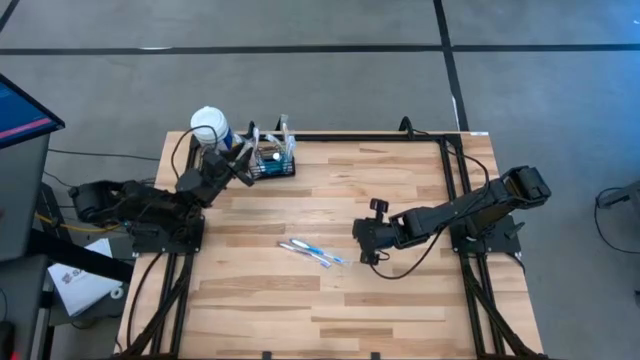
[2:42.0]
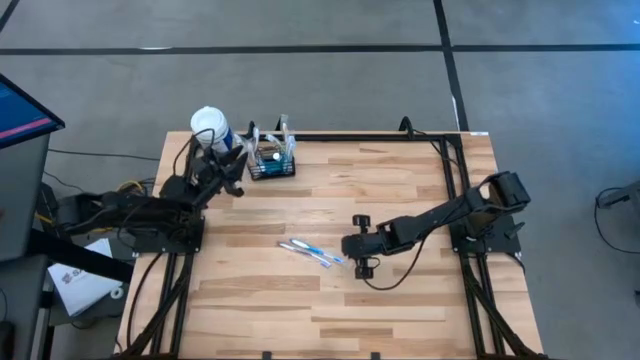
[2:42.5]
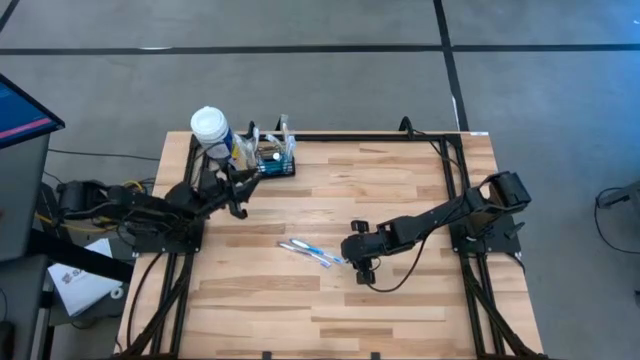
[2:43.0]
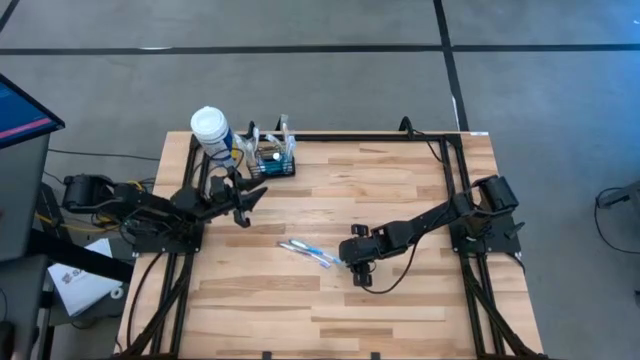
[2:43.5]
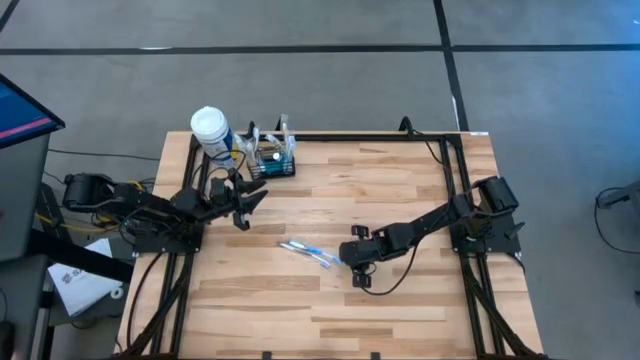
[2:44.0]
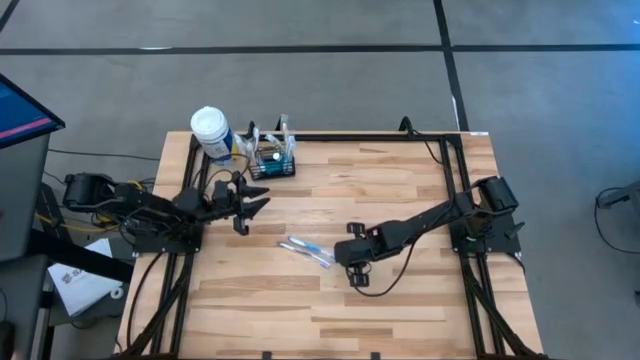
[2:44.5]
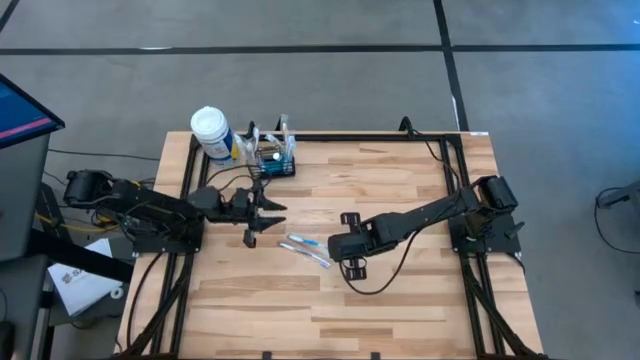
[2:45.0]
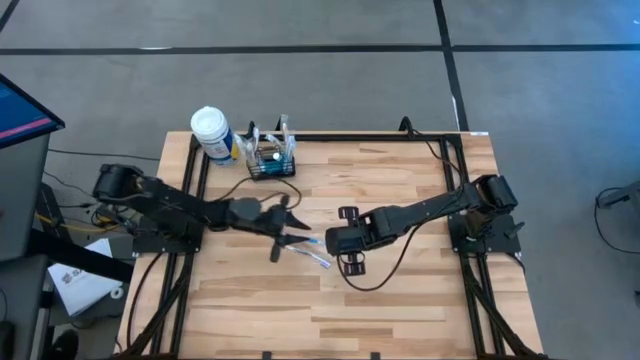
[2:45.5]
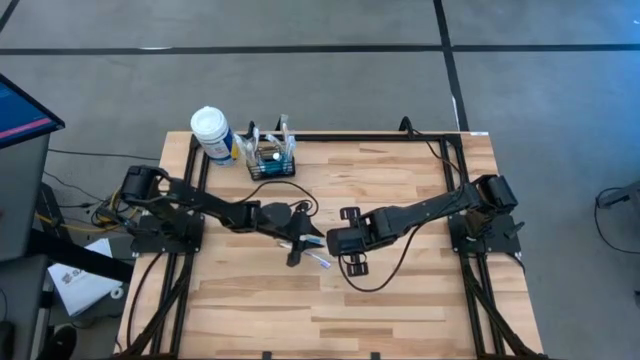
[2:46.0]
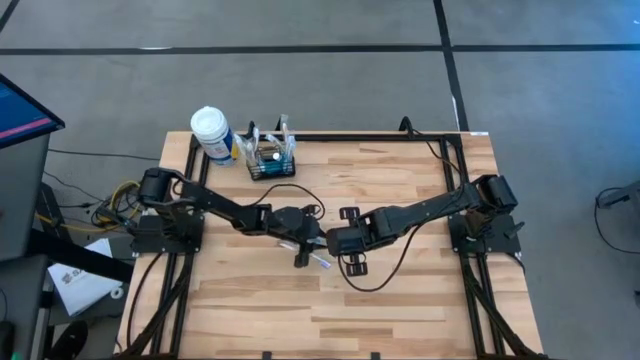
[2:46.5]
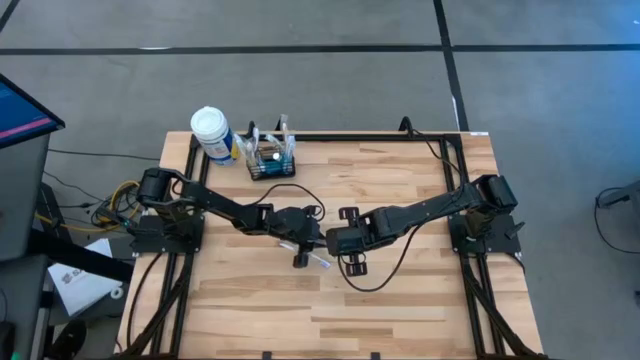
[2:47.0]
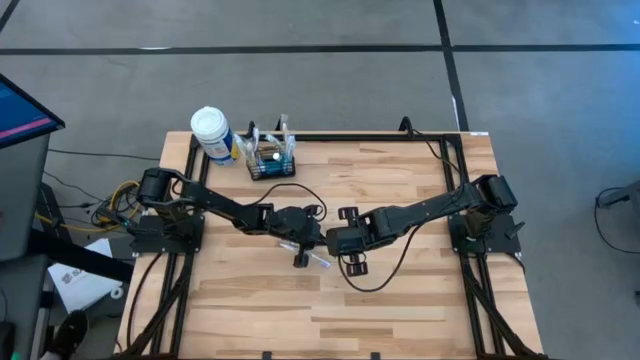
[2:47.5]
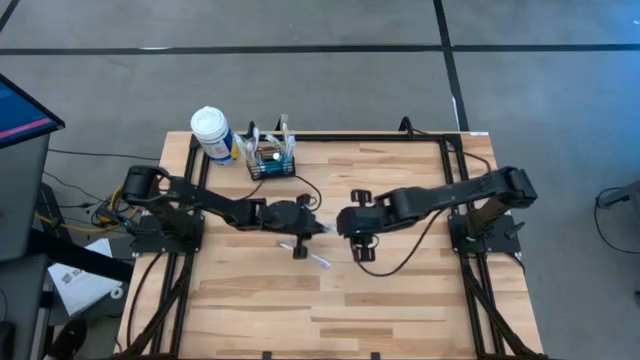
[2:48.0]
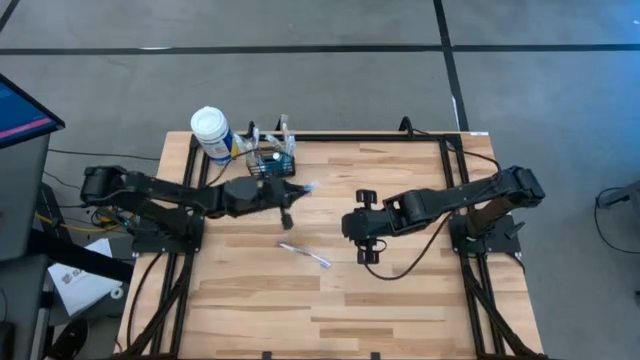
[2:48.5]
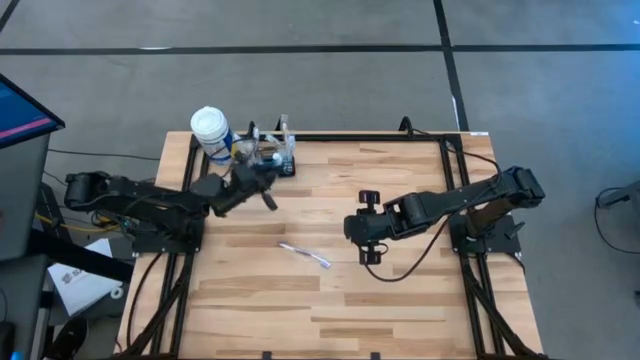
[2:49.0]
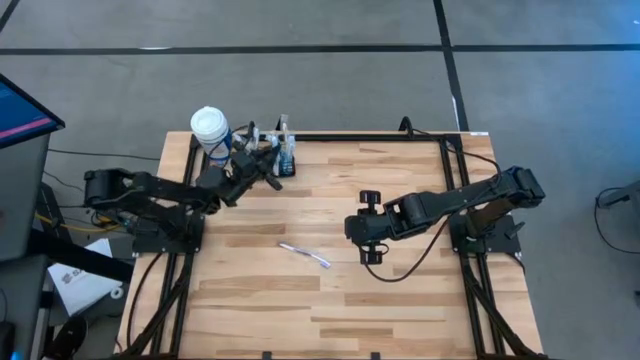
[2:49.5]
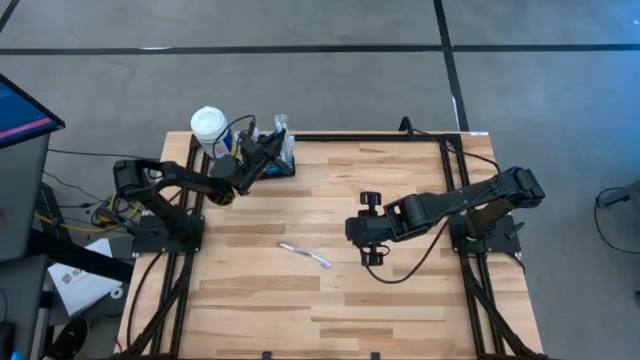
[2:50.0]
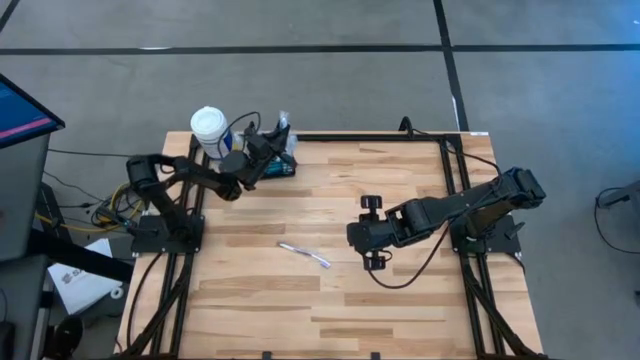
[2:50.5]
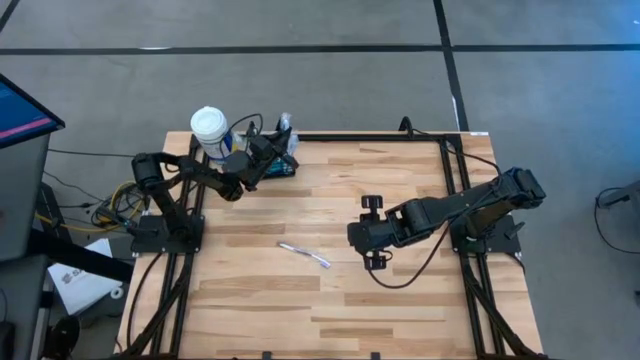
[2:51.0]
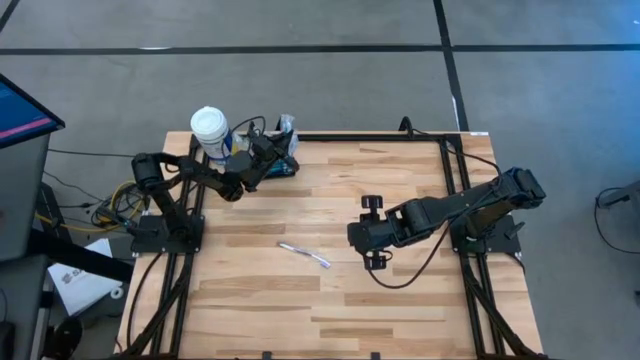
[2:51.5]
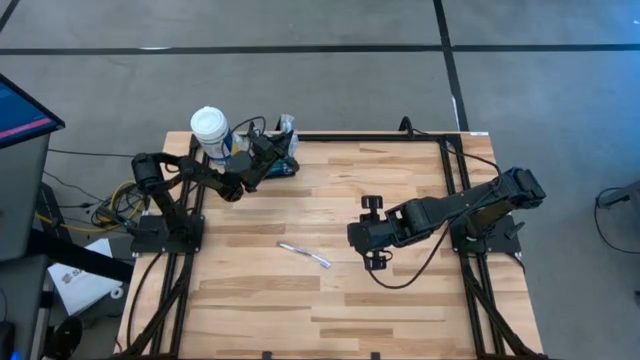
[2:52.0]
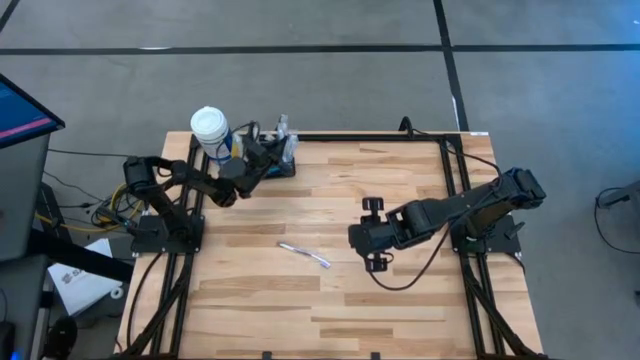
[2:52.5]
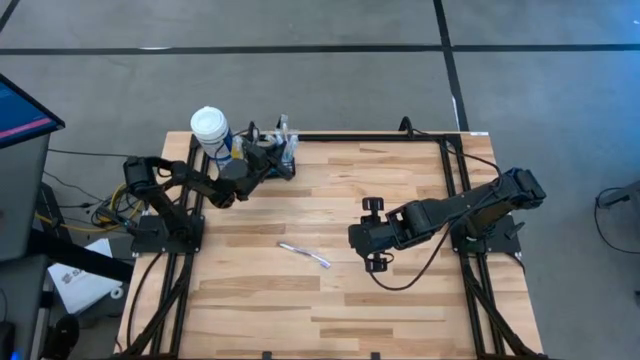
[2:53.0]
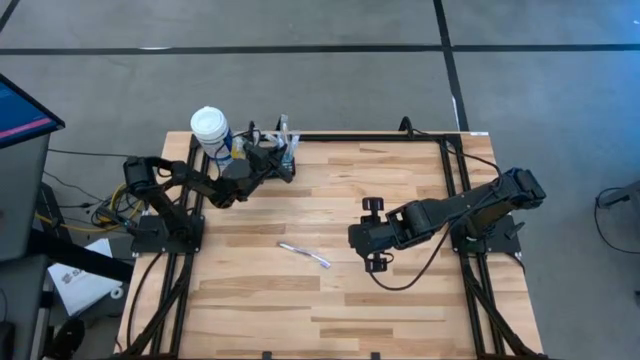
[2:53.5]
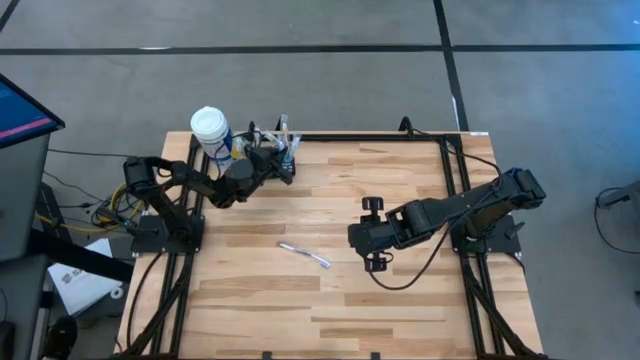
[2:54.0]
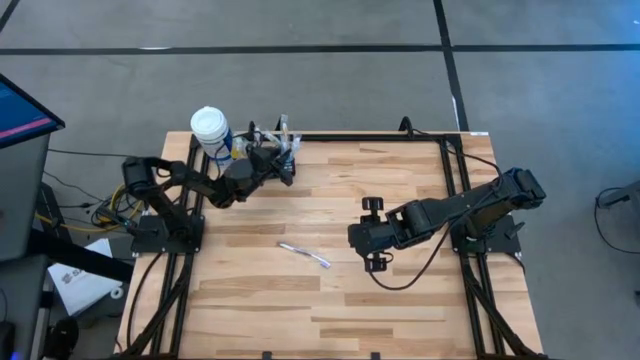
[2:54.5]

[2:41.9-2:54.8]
Task: Pick & Place toothbrushing station
Put the blue toothbrush into the black wire organizer

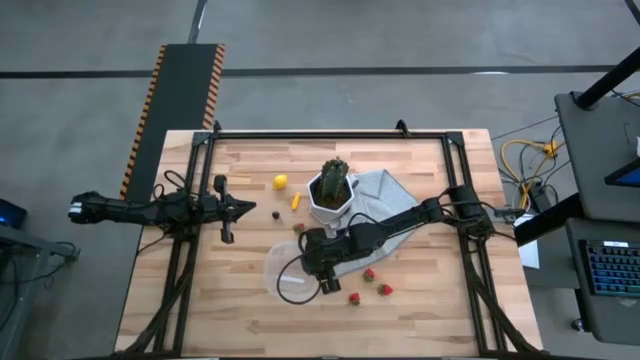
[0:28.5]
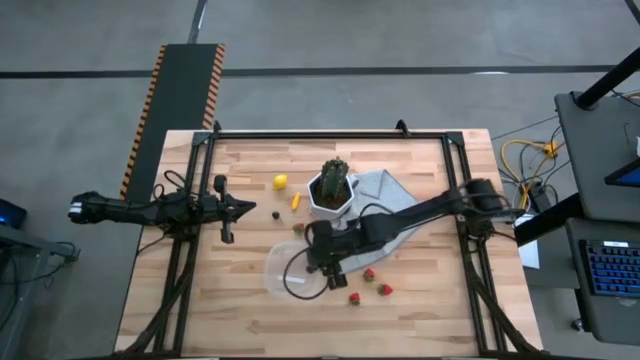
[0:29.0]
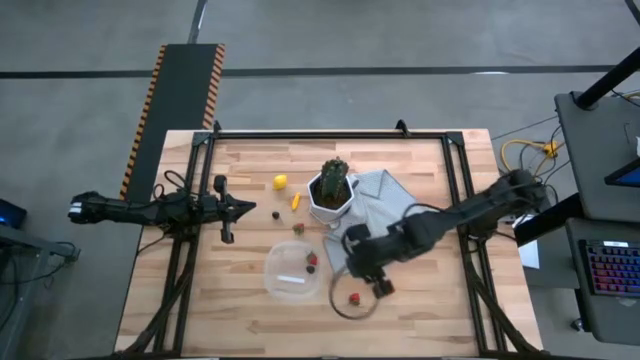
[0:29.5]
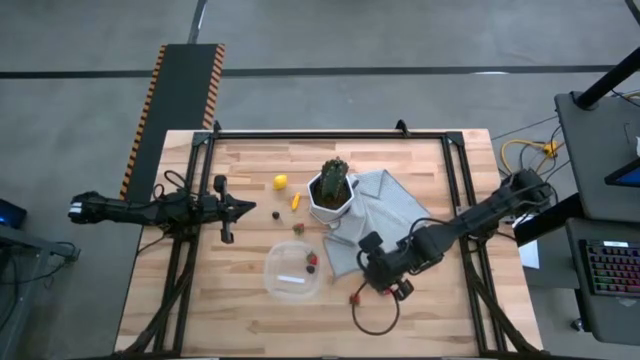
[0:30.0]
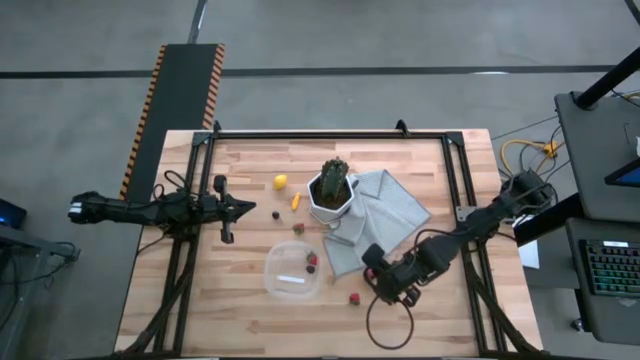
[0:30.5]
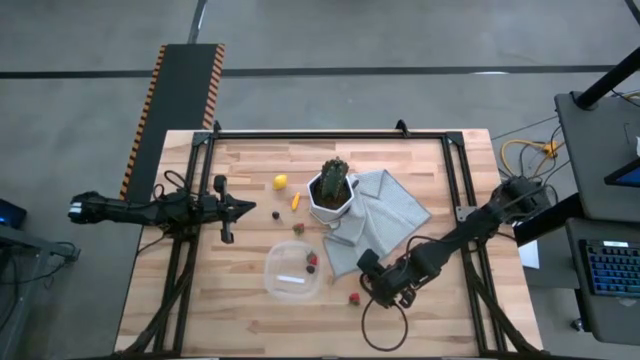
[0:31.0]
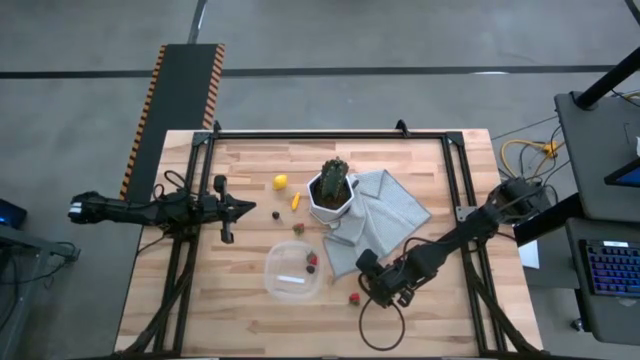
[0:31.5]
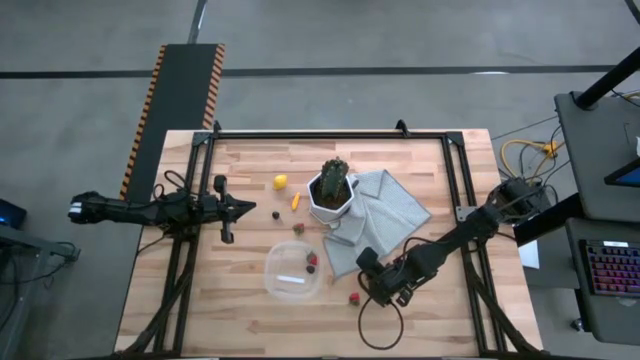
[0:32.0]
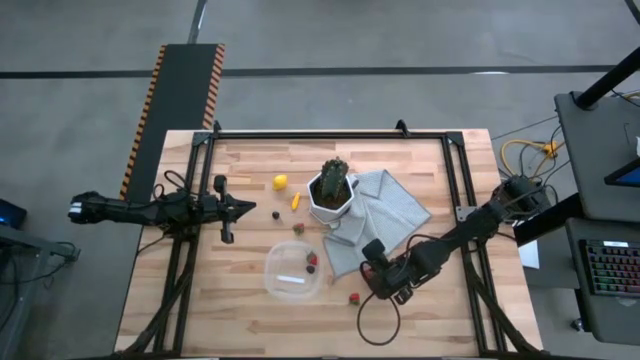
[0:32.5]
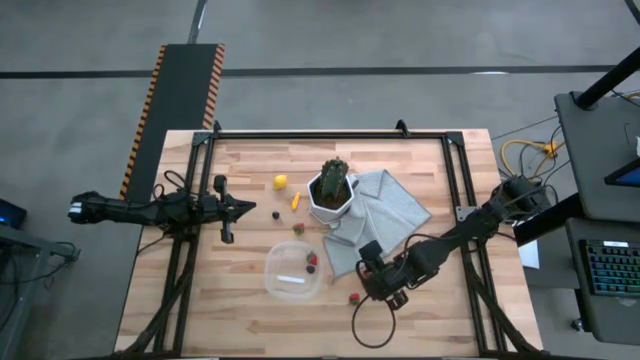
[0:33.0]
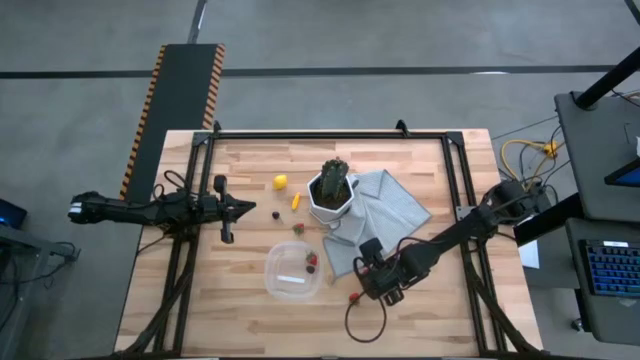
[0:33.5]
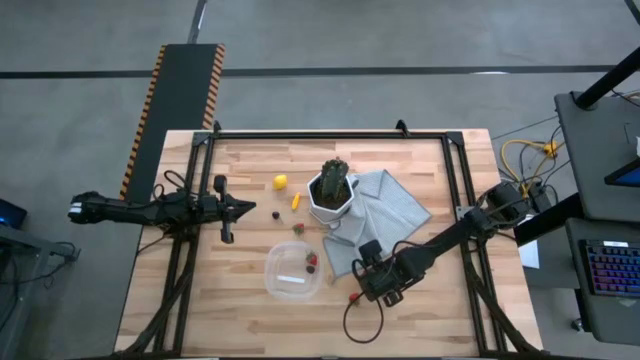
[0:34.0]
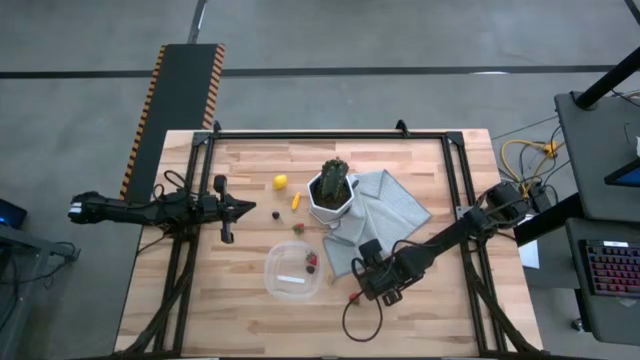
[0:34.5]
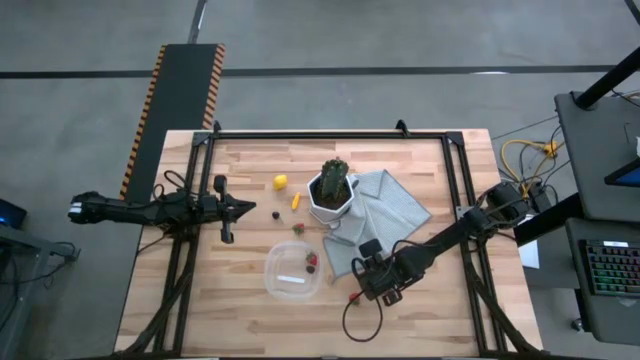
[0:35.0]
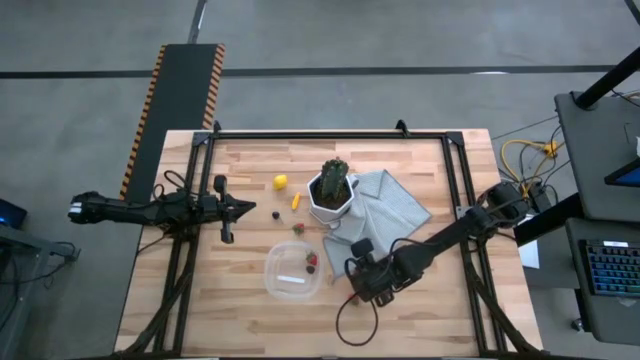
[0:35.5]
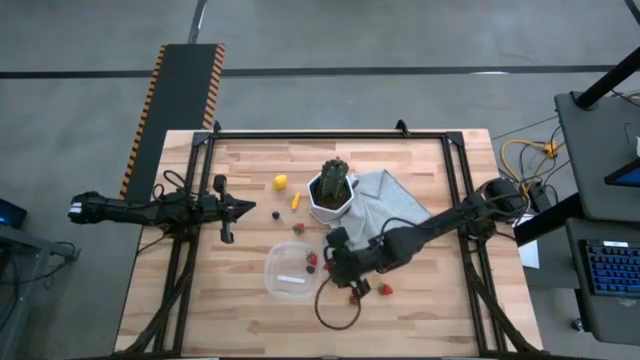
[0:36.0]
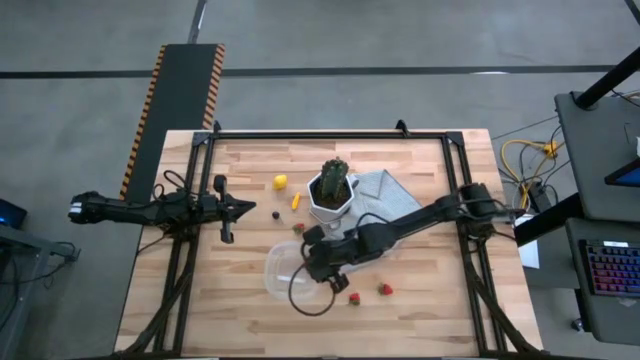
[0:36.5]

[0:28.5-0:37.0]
Task: Pick and placing Produce into tupperware
Put the strawberry into the transparent plastic container

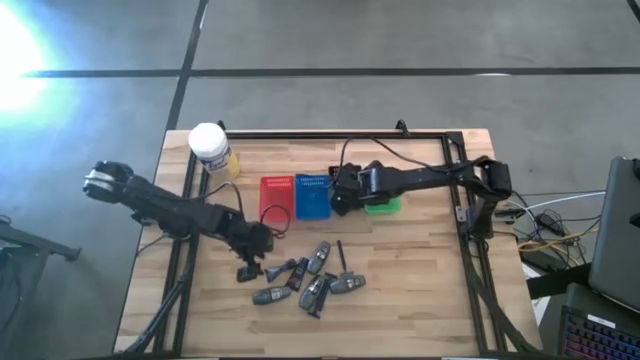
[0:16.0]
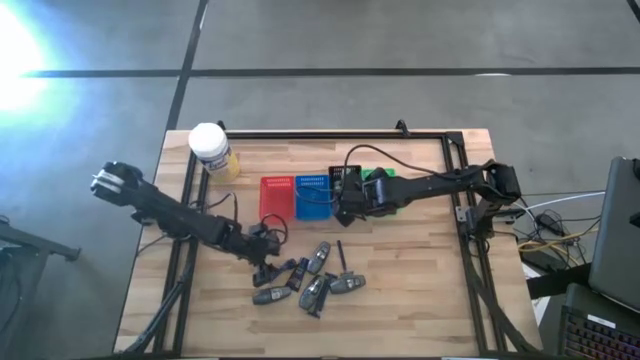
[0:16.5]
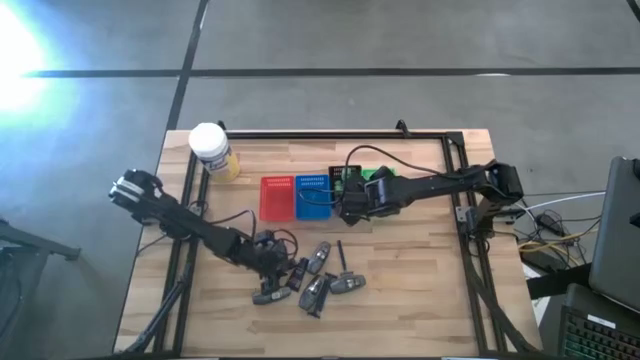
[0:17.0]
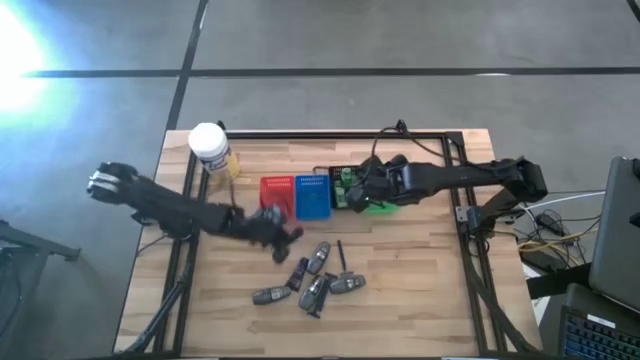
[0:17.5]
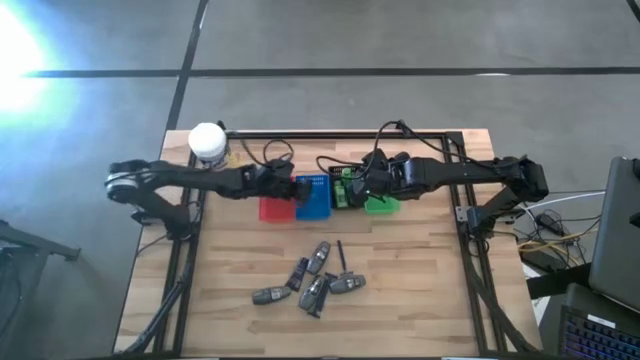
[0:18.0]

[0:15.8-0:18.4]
Task: Pick & Place Travel size toiletries
Put the blue shave cream into the blue bin
